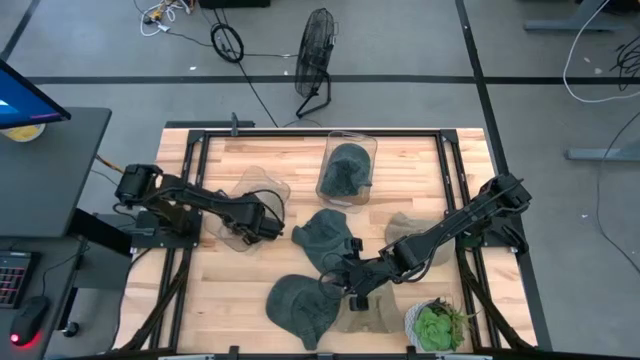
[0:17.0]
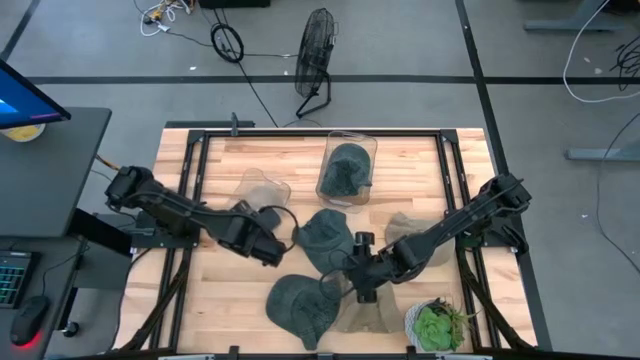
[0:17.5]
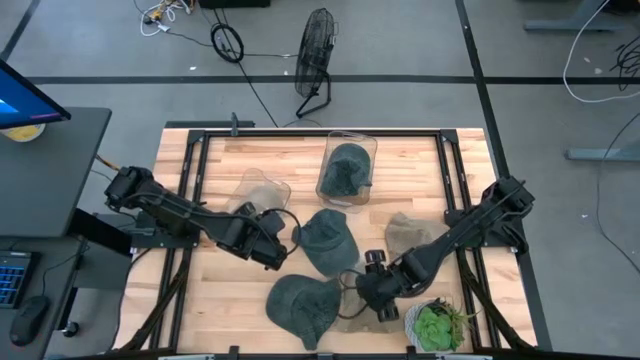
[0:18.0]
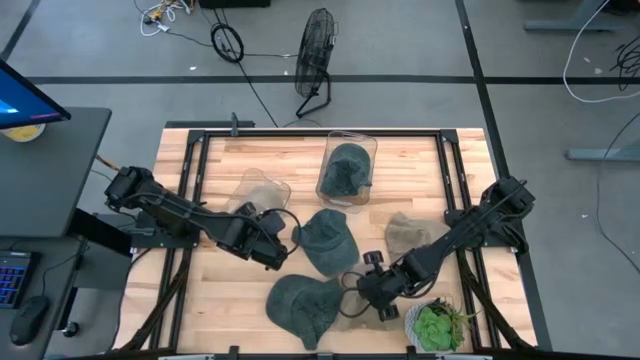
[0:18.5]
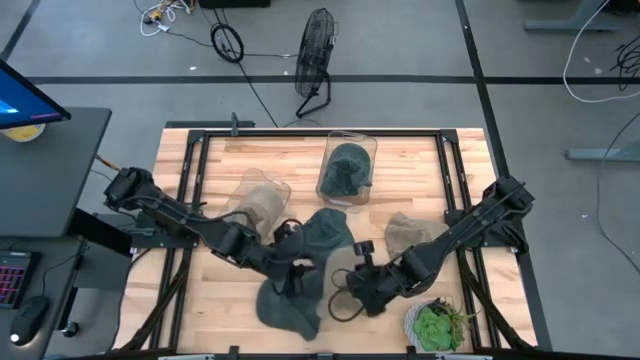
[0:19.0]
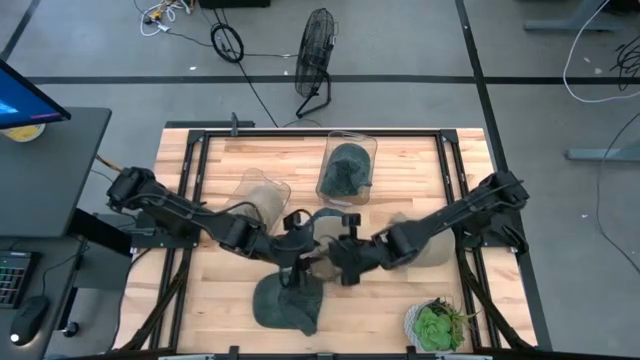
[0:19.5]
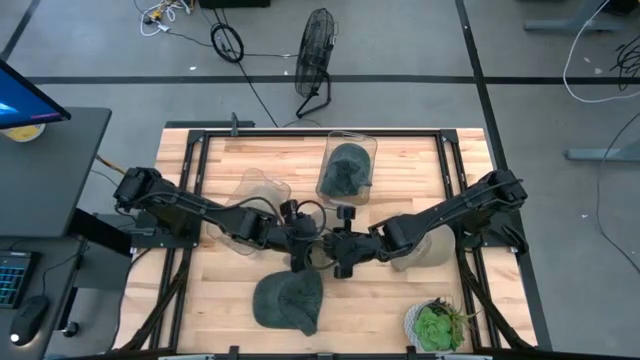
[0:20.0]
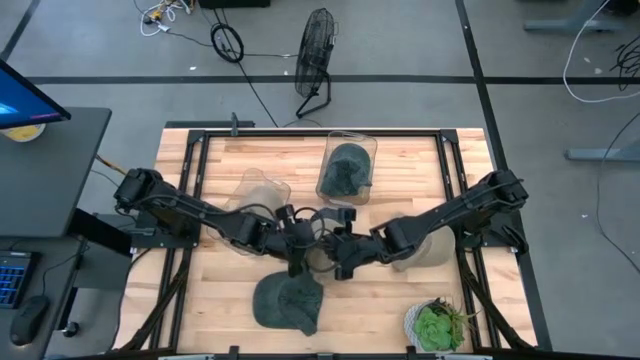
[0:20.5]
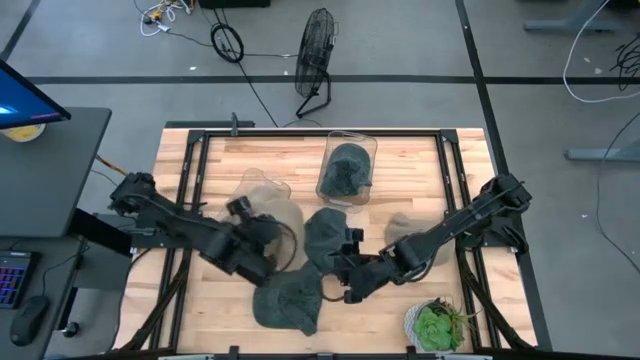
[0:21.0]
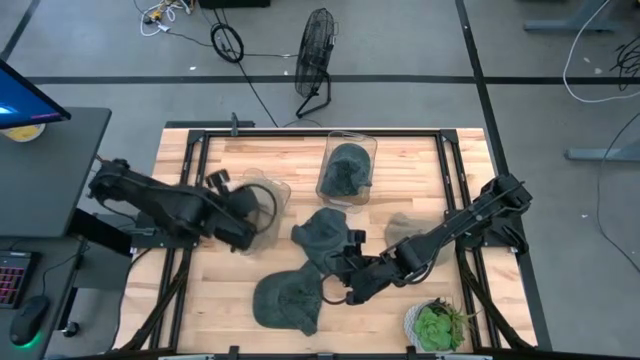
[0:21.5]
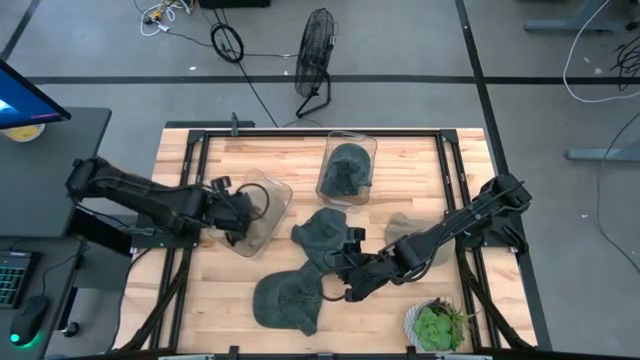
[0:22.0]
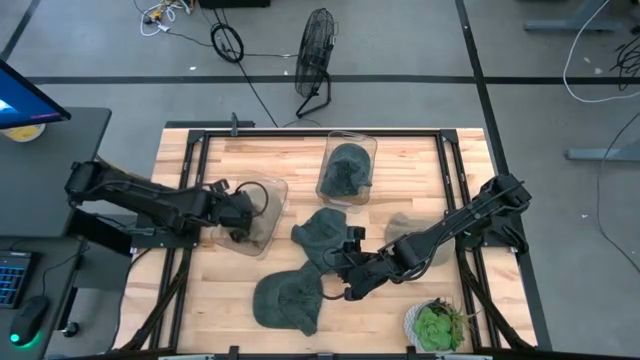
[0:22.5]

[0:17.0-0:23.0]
Task: Pick & Place hat
Put the bottom brown cap into the left transparent bin

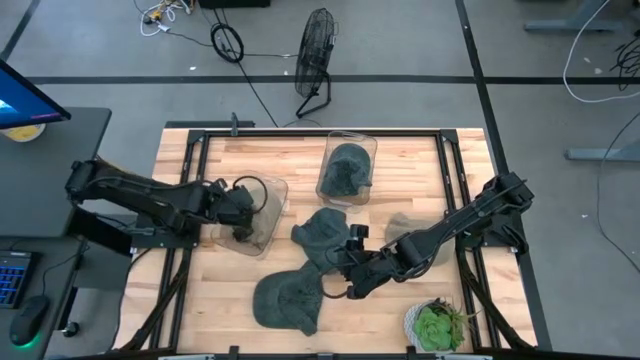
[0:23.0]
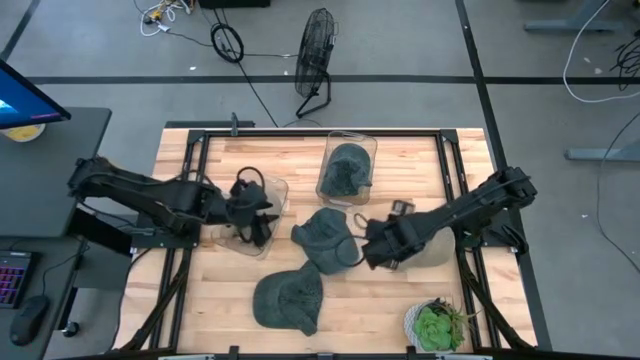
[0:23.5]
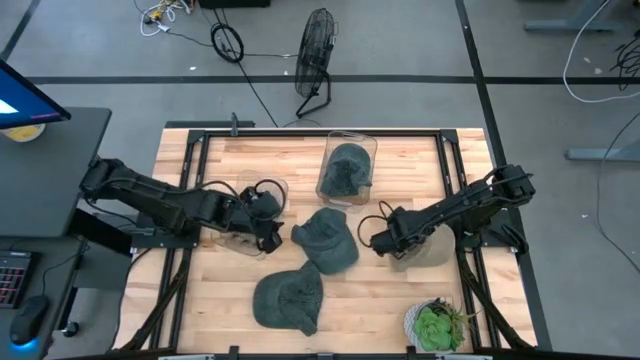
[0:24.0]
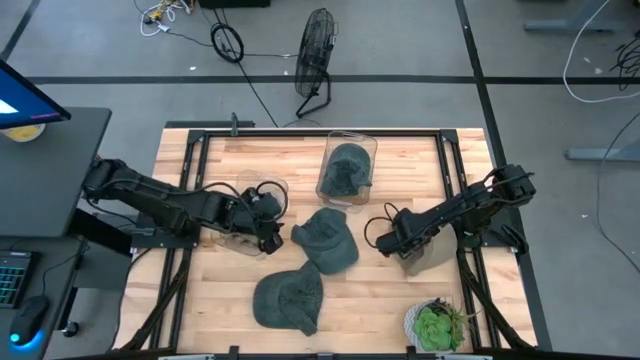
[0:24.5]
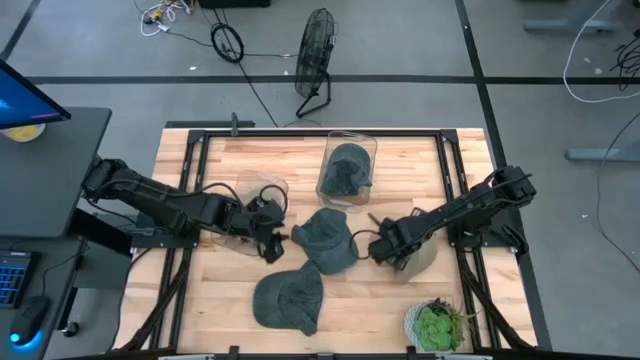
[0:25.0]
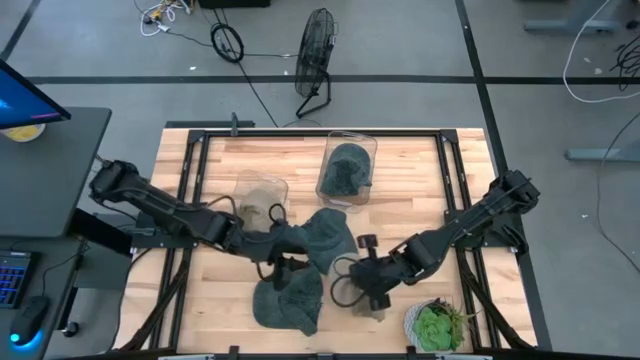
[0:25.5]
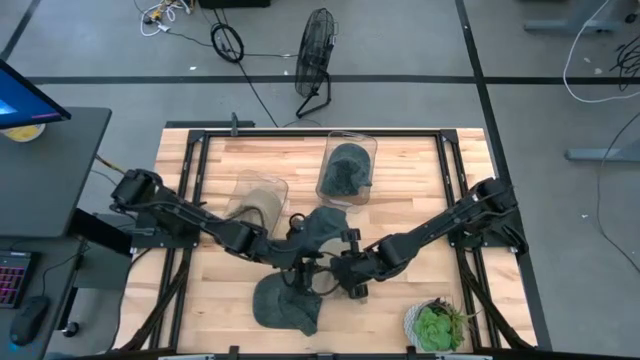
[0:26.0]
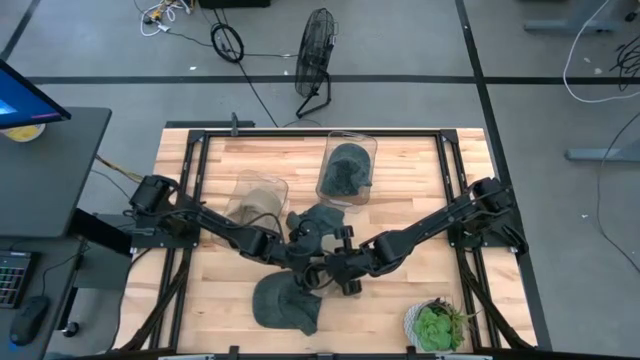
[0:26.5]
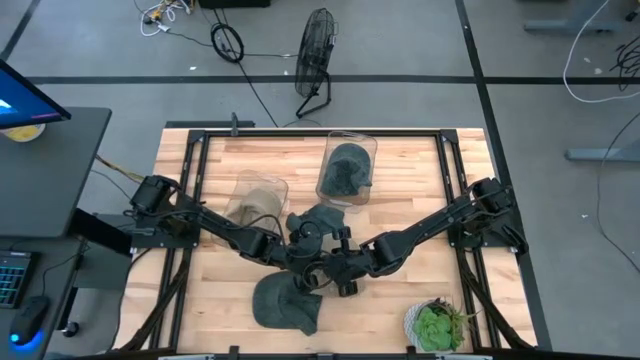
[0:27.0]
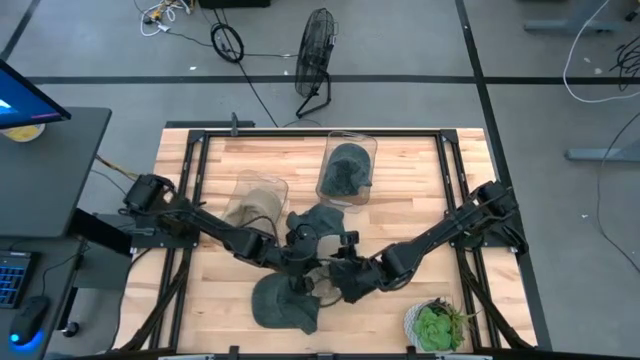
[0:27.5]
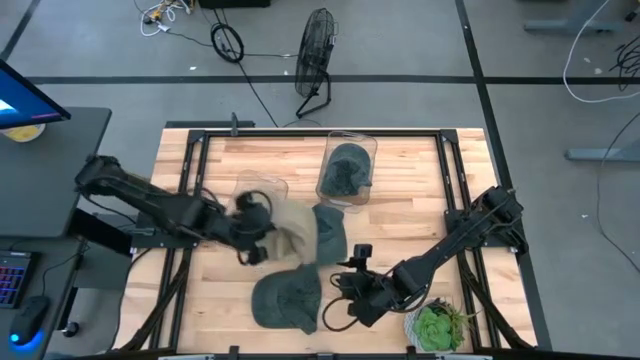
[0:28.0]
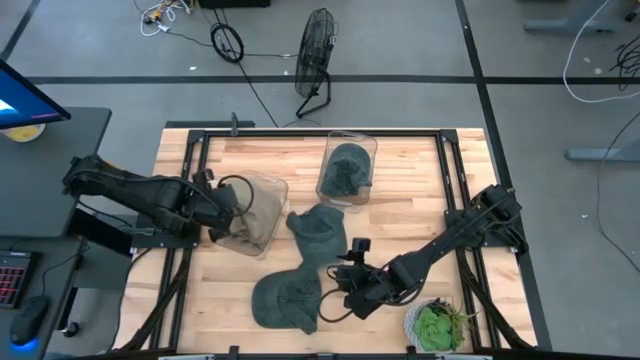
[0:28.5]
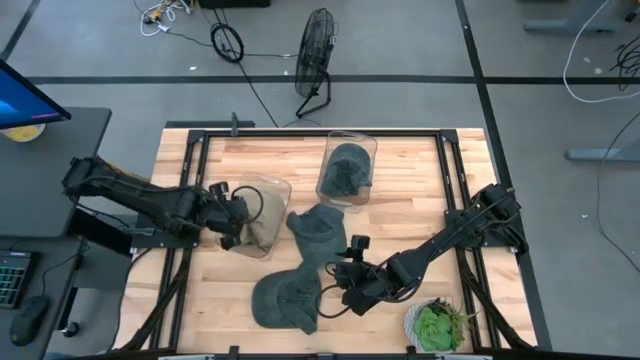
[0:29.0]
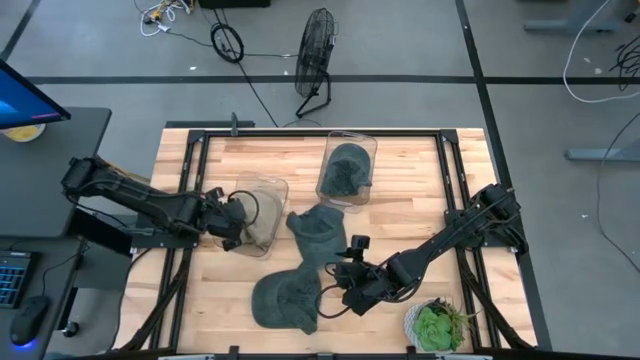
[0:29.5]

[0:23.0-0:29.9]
Put the brown cap into the left transparent bin

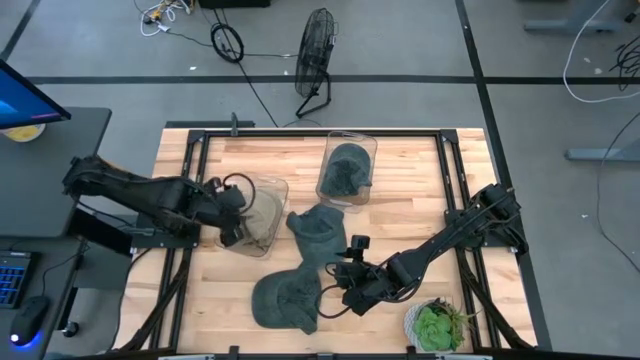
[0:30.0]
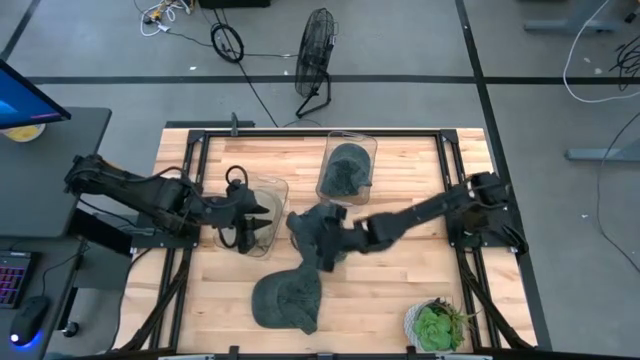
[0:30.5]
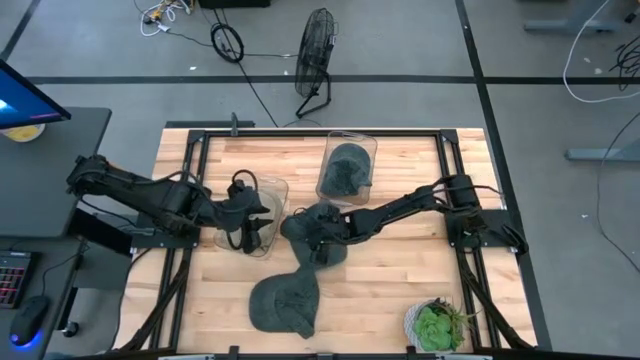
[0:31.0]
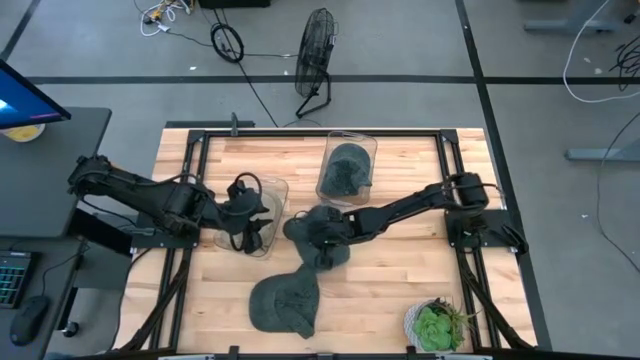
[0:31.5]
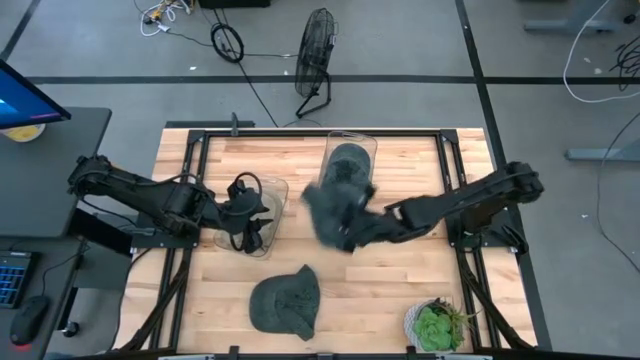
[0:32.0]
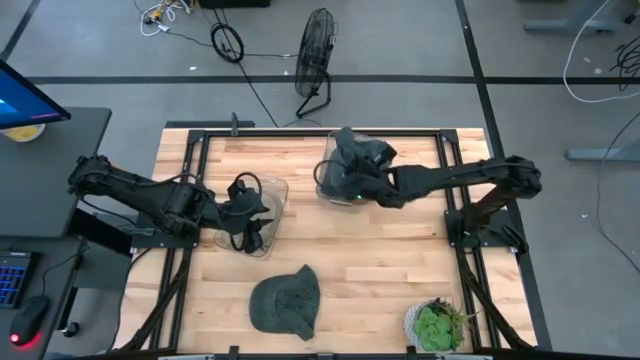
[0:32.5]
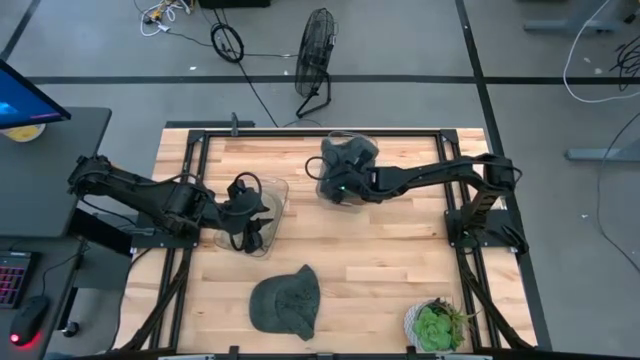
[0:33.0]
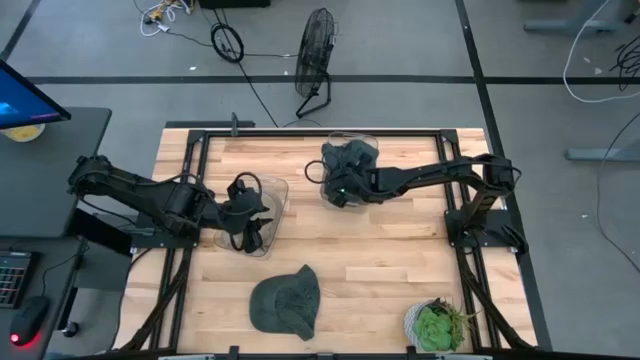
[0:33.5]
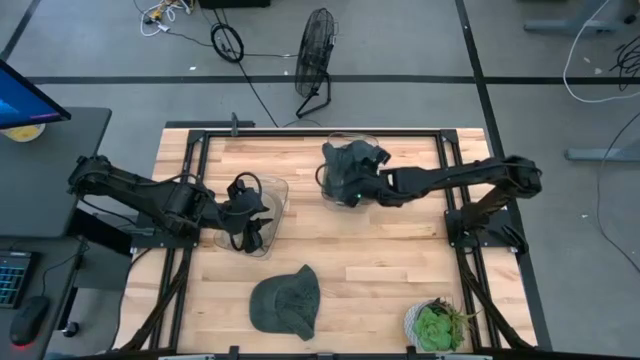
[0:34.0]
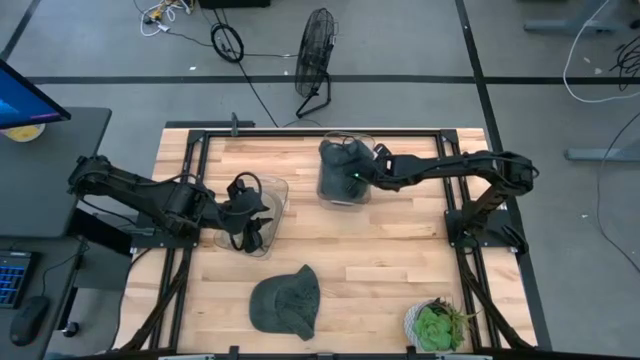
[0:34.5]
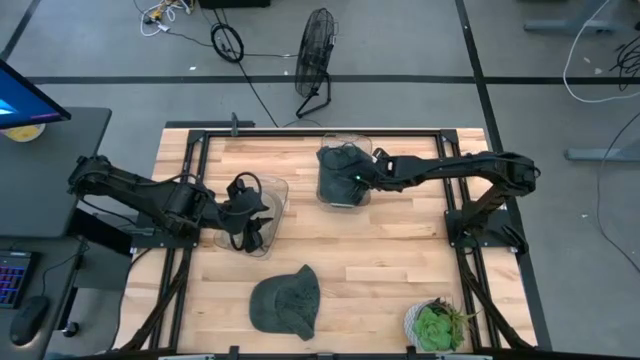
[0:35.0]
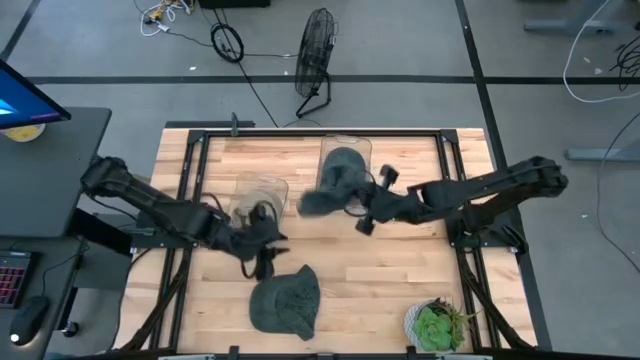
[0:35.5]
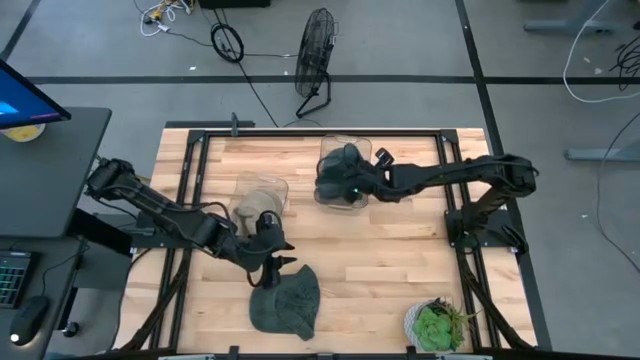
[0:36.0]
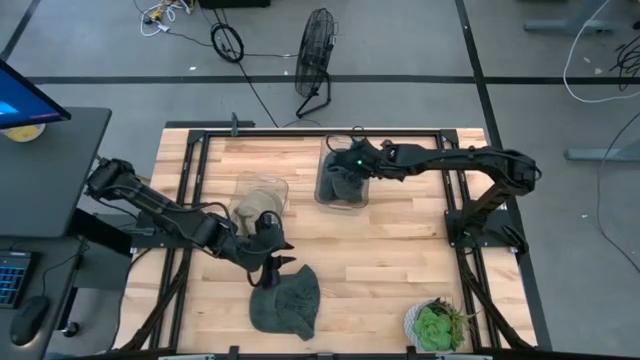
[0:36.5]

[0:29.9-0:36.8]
Put the top blue cap into the right transparent bin
